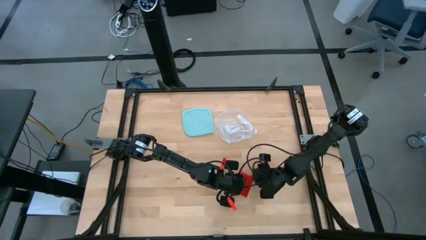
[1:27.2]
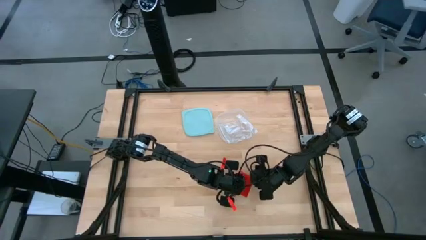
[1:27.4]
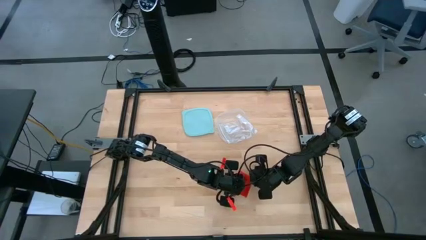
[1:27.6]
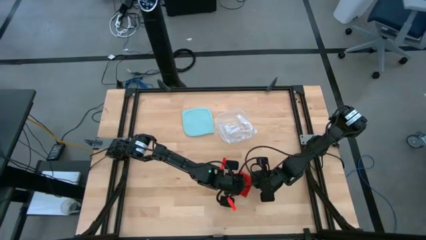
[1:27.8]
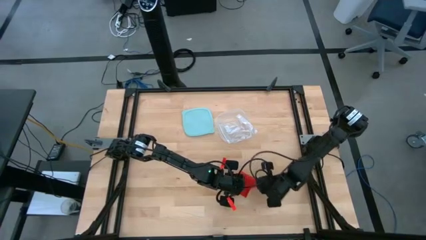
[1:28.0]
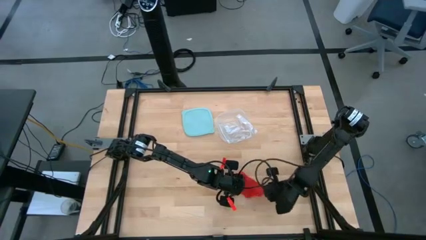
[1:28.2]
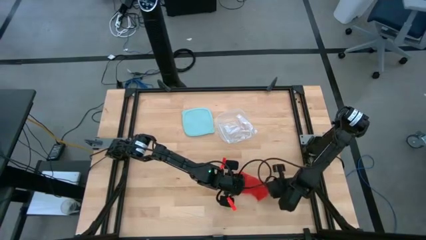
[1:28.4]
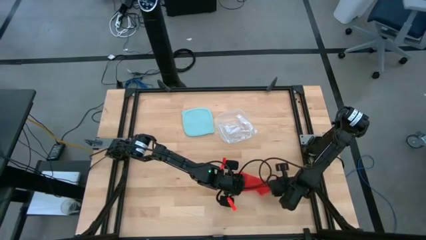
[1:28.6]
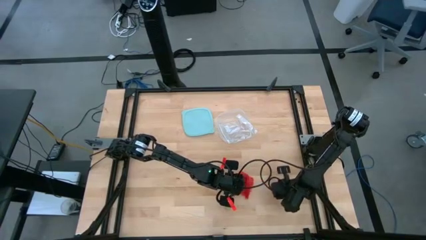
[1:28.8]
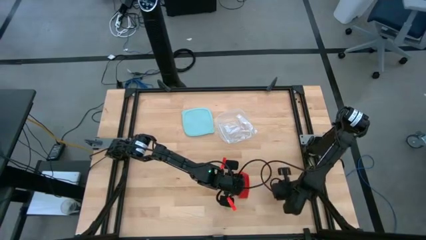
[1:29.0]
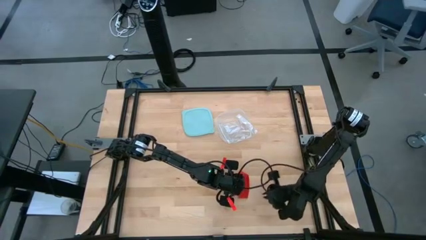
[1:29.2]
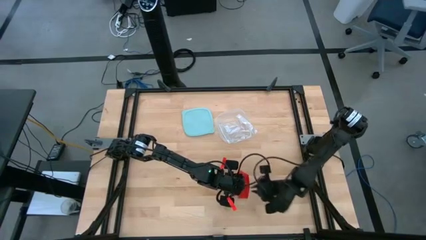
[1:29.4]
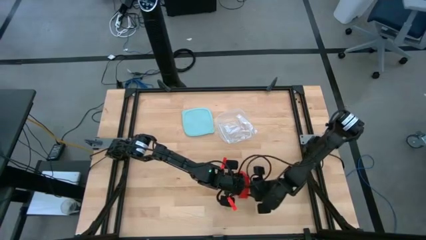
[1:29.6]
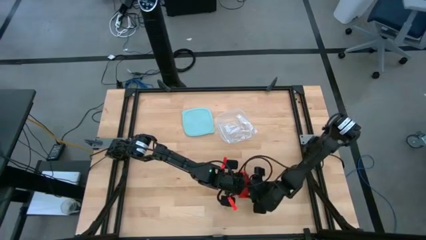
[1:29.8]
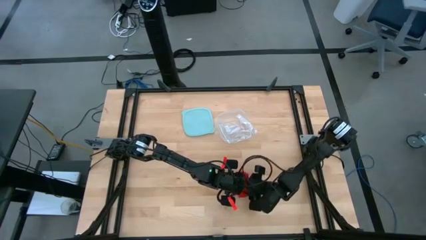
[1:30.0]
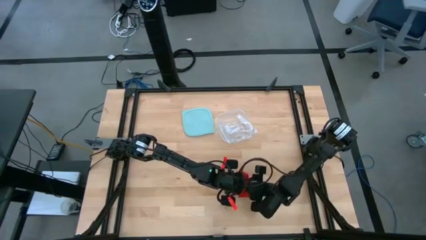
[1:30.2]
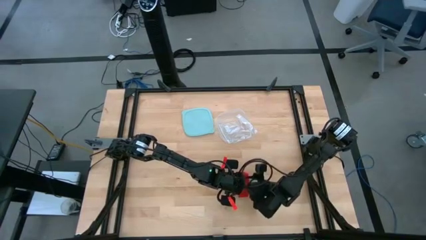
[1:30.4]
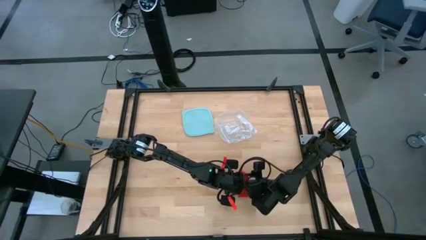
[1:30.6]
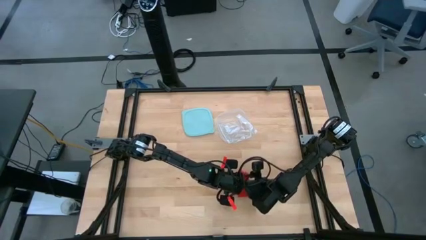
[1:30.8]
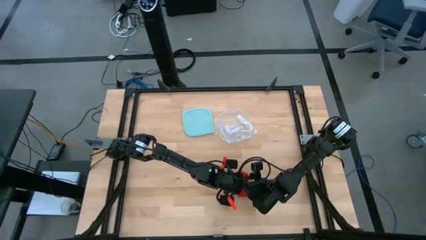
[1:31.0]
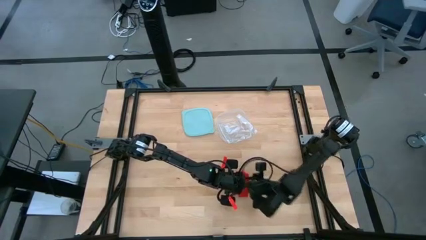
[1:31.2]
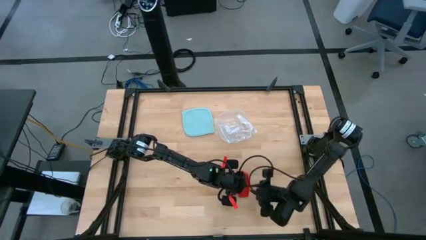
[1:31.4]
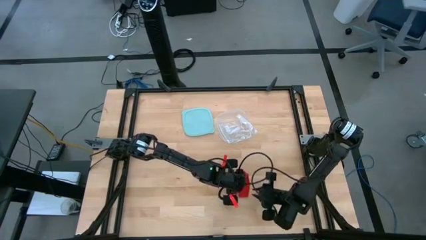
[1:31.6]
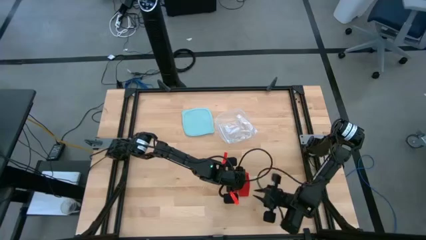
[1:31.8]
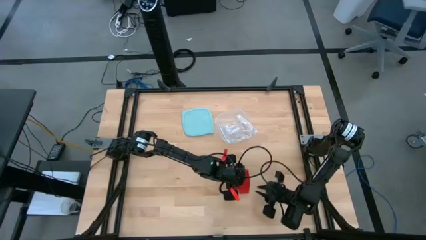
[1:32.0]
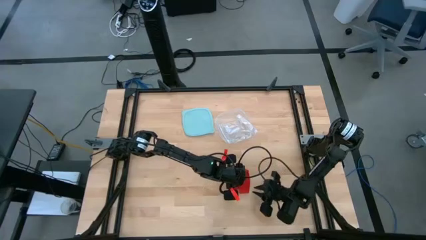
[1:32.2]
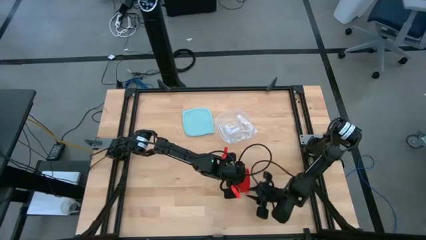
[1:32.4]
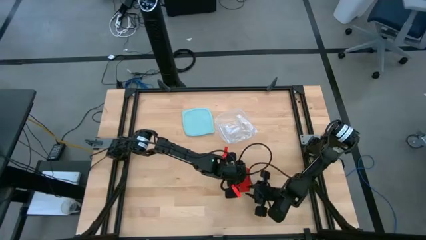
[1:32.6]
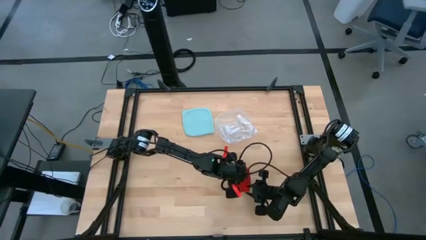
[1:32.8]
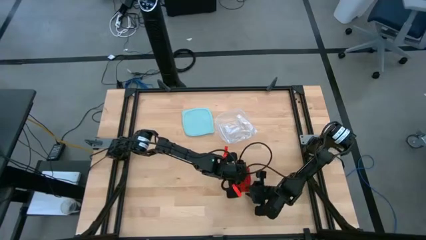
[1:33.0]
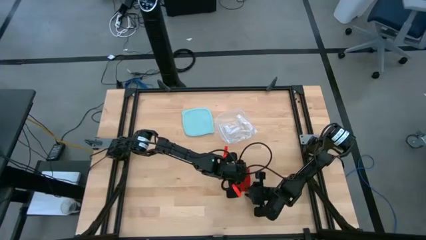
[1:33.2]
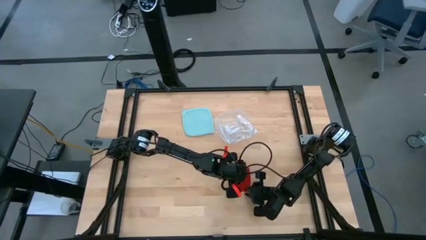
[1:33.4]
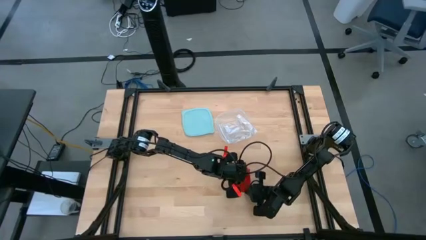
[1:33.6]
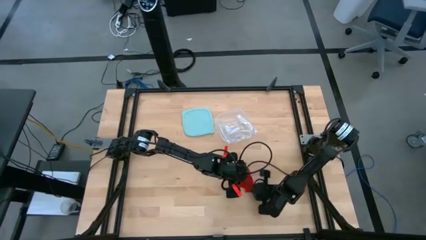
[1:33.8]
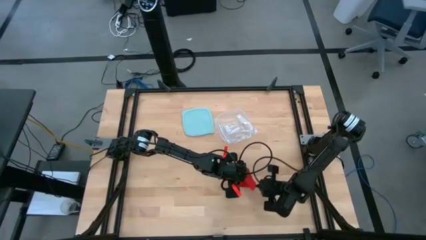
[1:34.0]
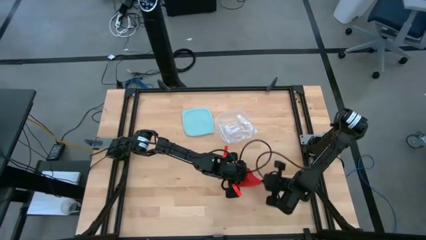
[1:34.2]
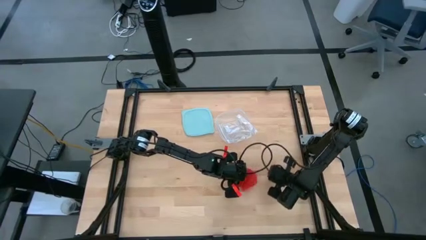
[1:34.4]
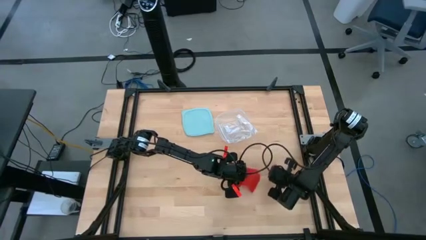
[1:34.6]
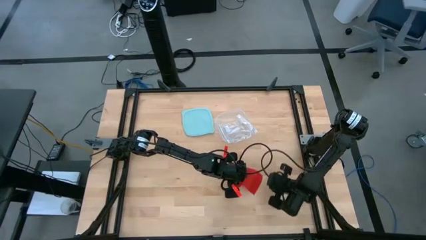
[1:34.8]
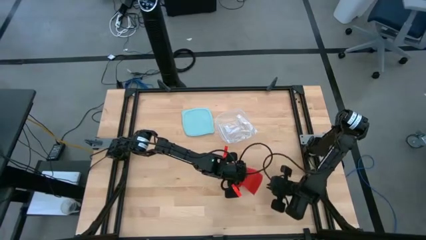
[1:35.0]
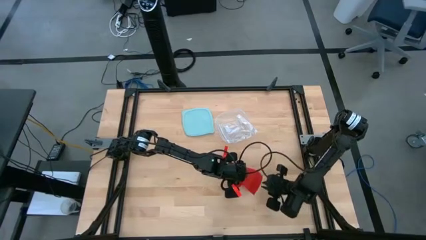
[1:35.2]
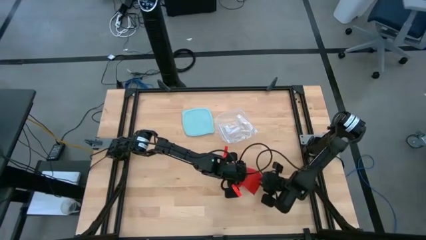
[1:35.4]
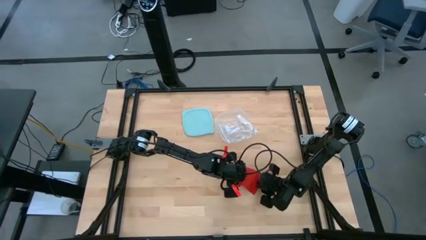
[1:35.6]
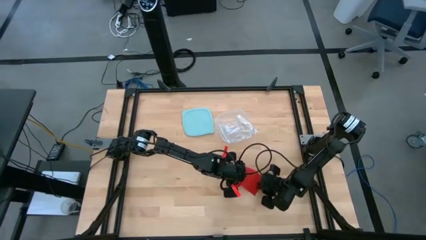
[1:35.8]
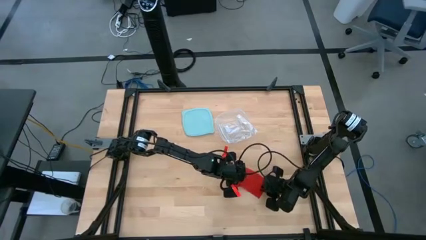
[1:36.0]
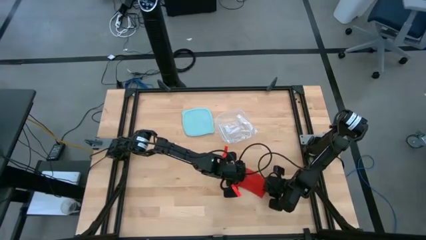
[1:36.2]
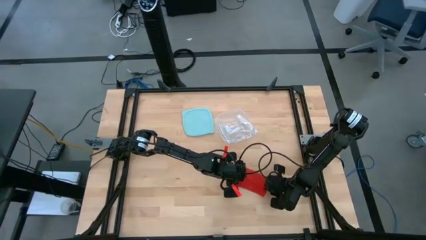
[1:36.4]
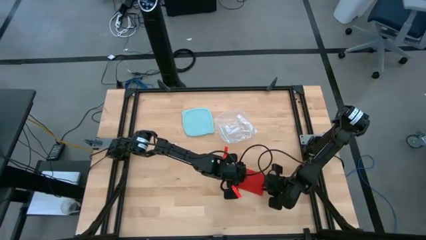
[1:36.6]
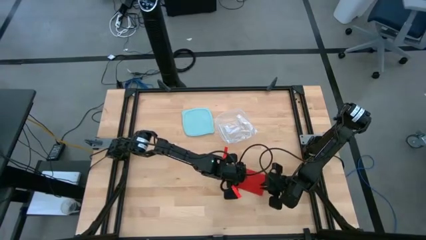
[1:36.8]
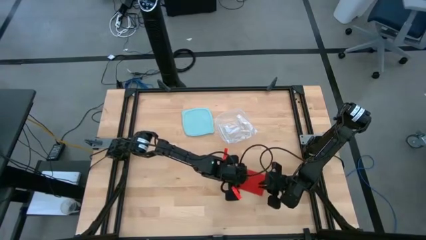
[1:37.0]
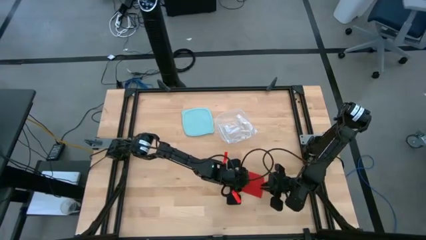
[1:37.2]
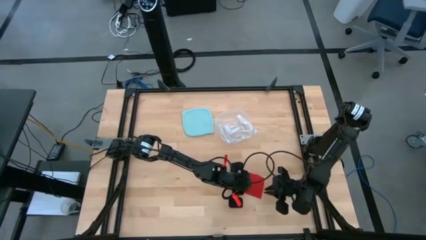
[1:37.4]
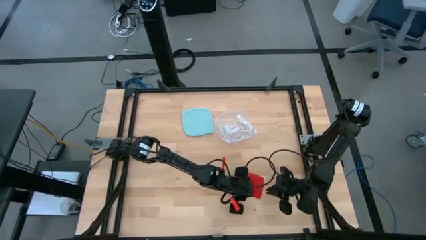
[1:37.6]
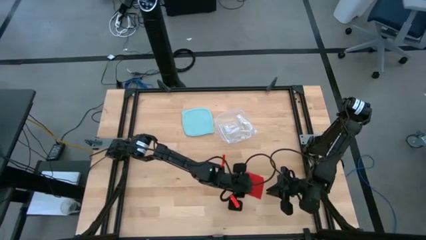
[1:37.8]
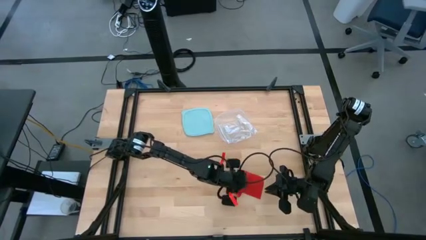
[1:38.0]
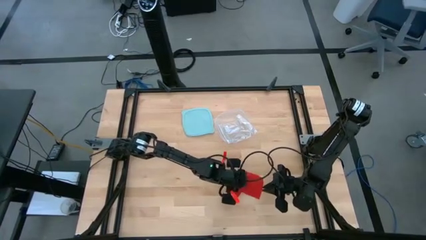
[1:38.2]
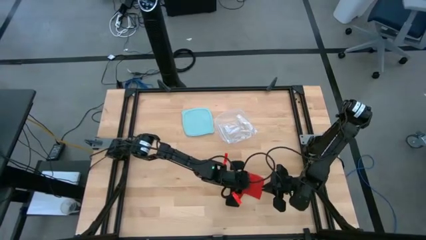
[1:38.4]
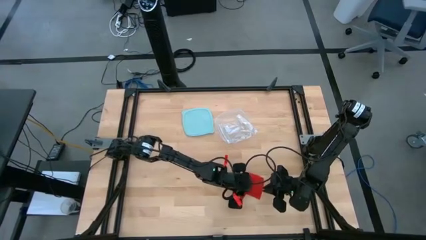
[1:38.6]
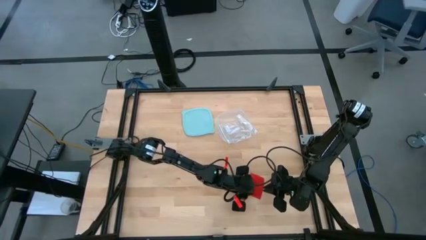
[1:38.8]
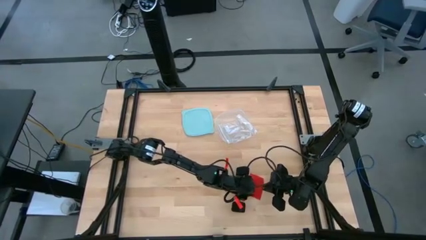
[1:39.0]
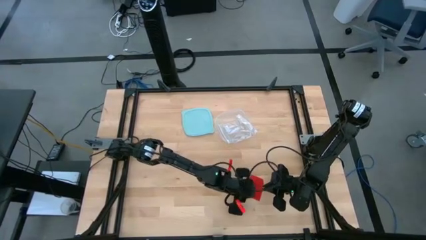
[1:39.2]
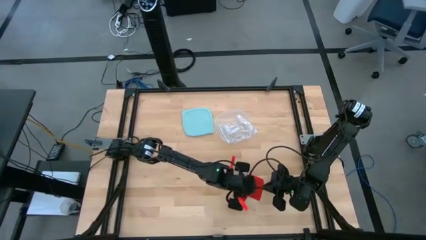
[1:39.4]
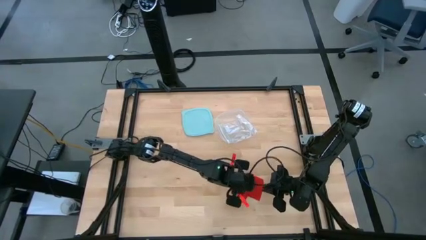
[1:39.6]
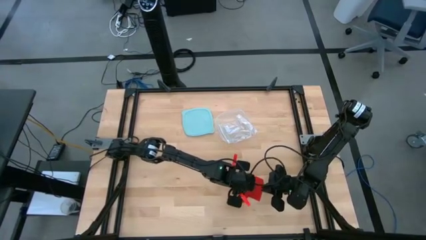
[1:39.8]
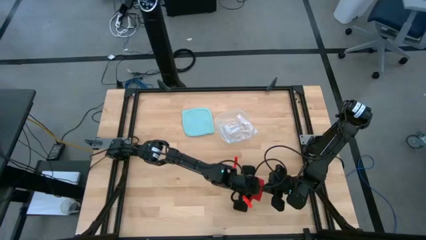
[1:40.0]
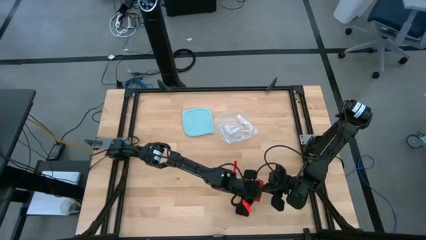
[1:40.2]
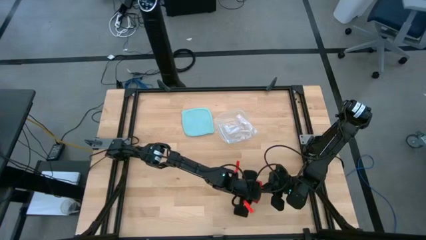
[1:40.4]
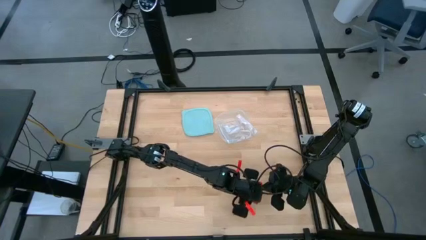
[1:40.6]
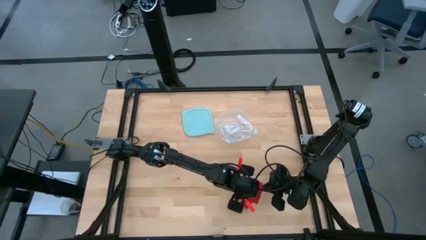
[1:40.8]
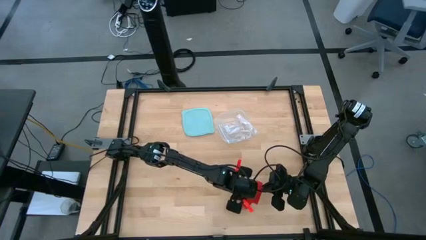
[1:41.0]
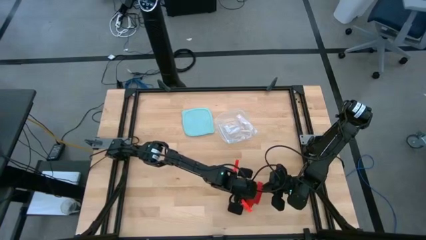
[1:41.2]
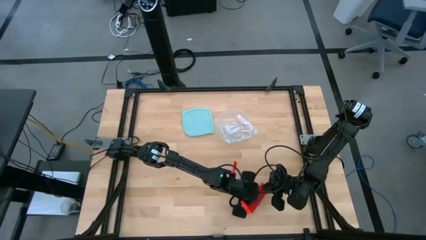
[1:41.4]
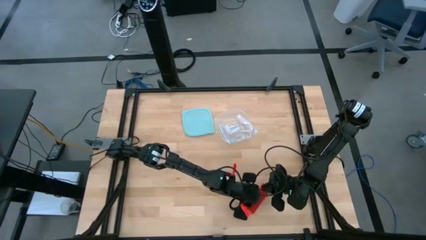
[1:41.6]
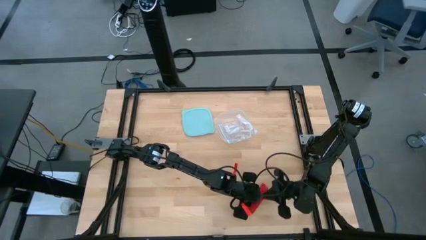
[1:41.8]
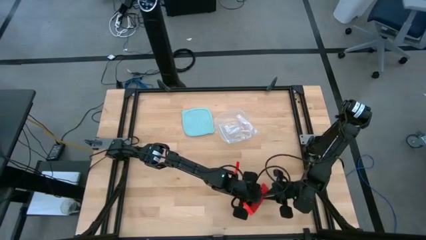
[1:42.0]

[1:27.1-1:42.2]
Task: Roll bandage
Roll the red bandage

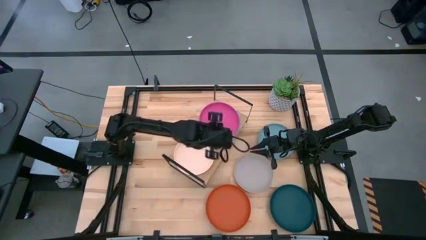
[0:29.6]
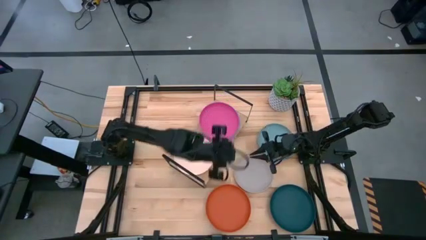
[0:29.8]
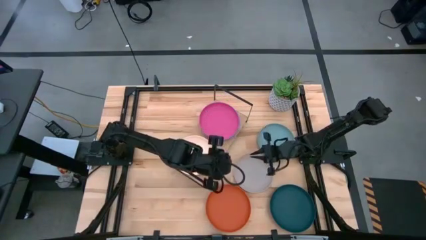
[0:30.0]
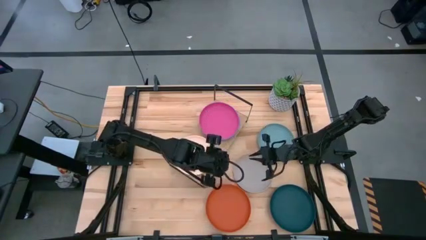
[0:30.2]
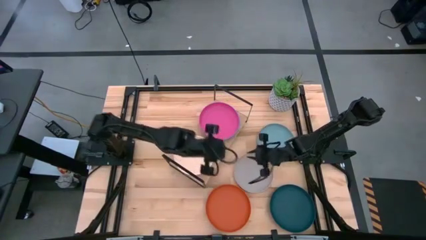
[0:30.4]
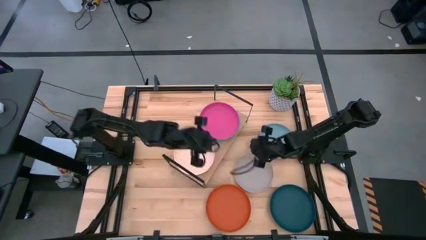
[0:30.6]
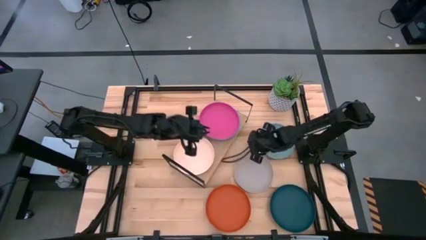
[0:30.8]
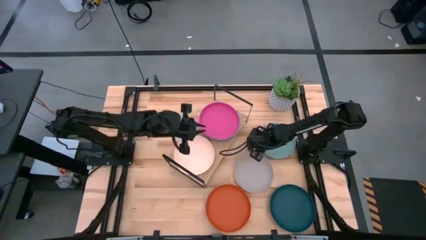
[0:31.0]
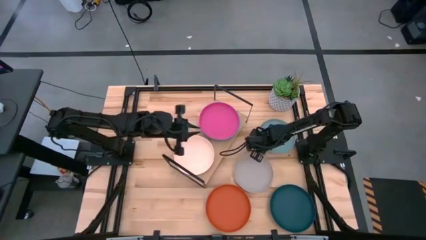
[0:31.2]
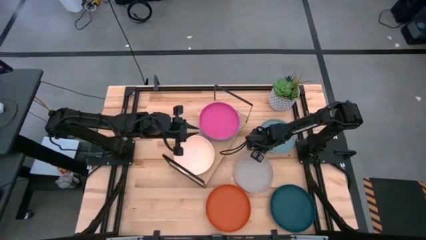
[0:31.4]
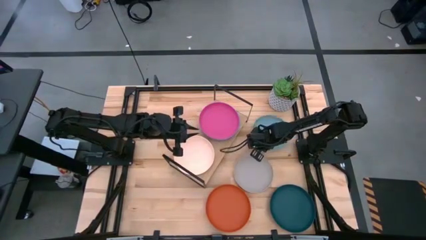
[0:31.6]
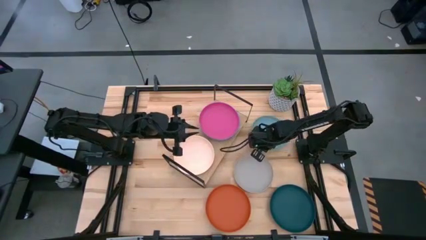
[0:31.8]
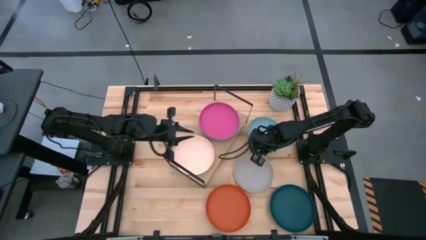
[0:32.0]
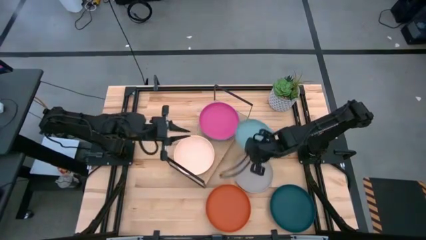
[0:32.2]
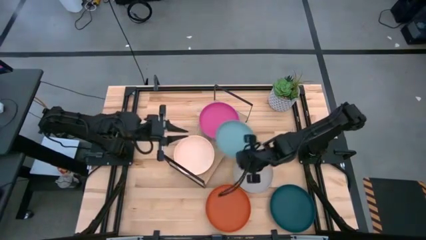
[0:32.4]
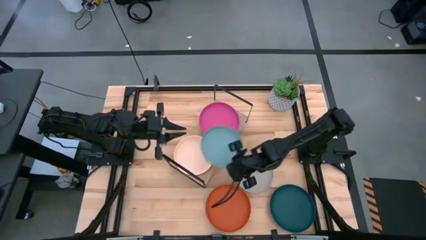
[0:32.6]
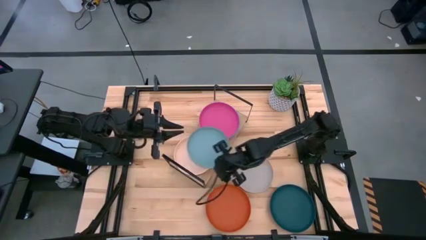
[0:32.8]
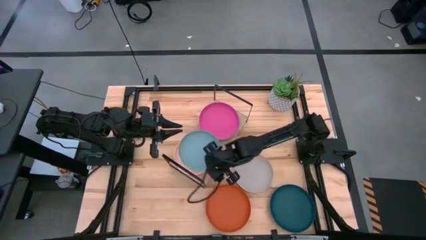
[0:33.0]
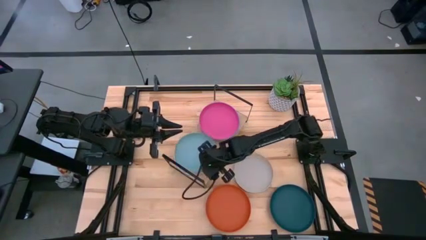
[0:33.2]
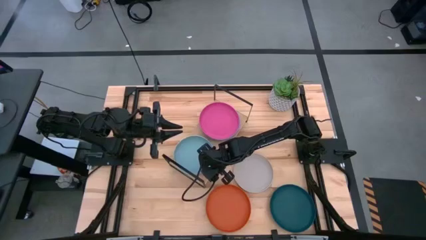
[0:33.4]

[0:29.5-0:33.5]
Task: Place and stack plates onto a shelf
Stack the light blue plate on top of the white plate on the shelf
